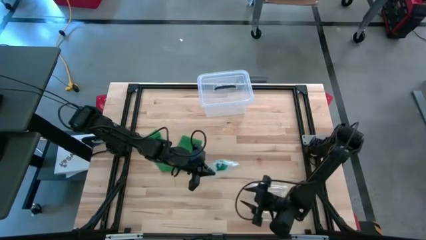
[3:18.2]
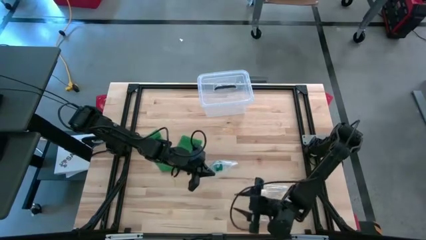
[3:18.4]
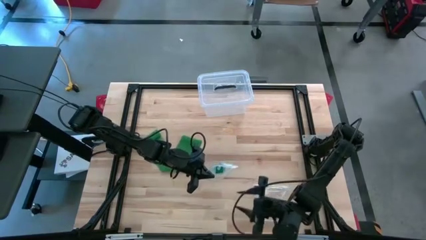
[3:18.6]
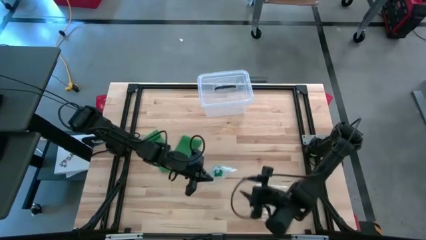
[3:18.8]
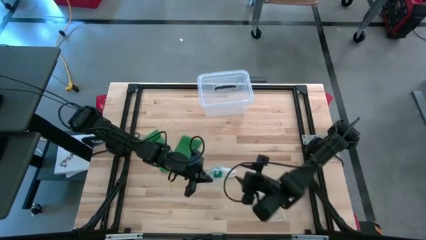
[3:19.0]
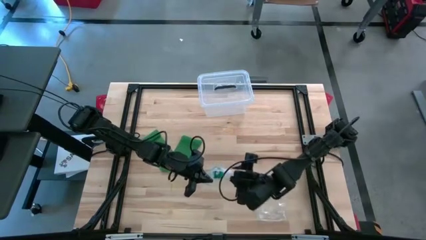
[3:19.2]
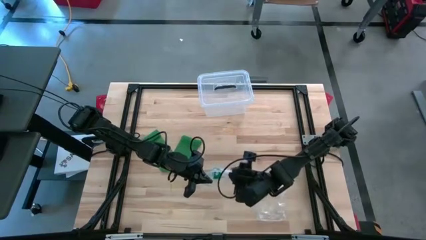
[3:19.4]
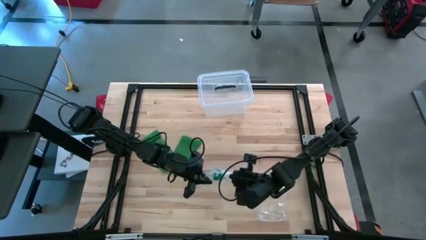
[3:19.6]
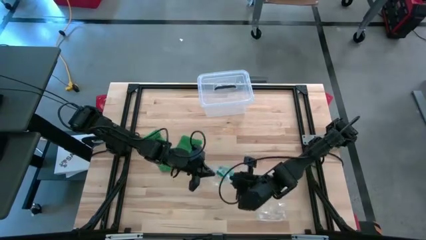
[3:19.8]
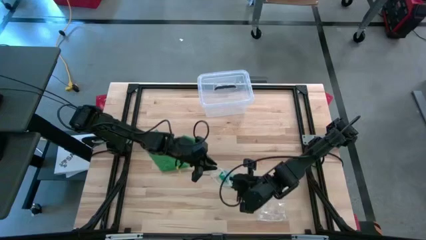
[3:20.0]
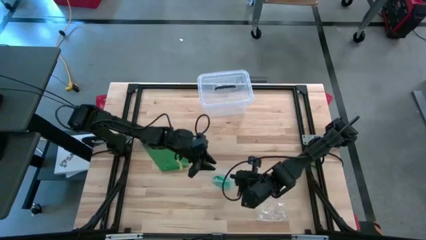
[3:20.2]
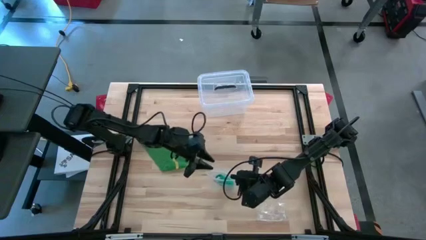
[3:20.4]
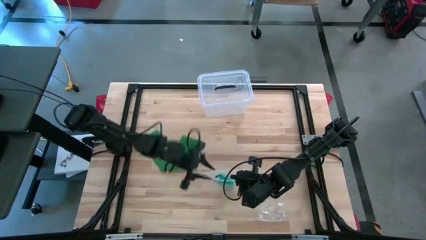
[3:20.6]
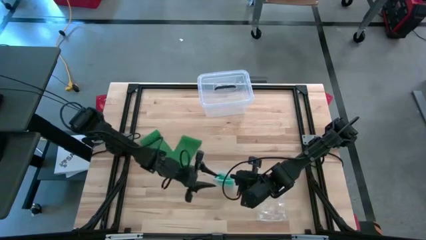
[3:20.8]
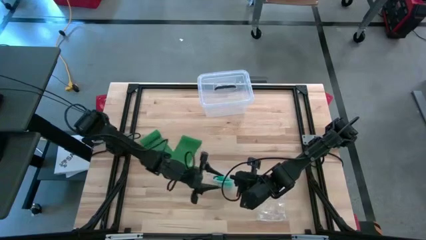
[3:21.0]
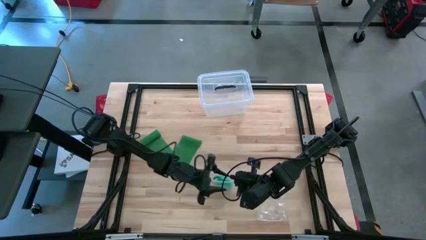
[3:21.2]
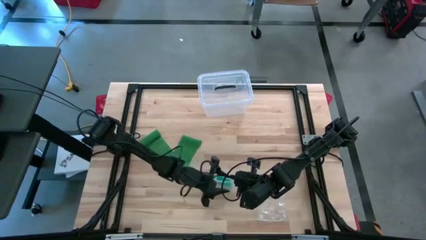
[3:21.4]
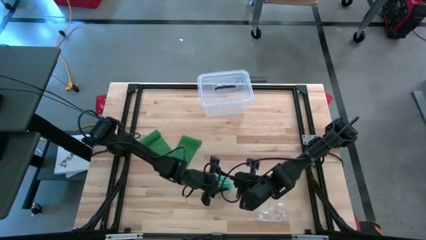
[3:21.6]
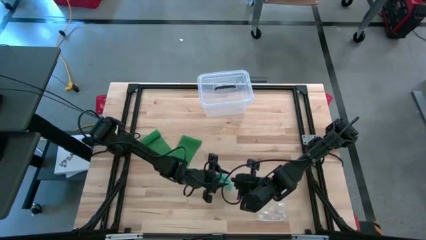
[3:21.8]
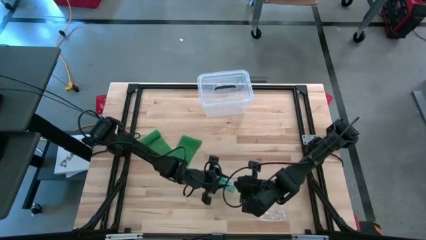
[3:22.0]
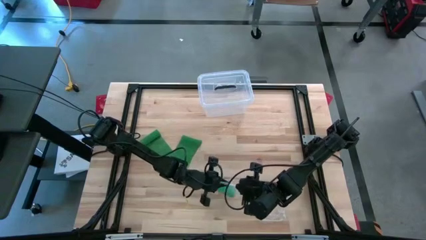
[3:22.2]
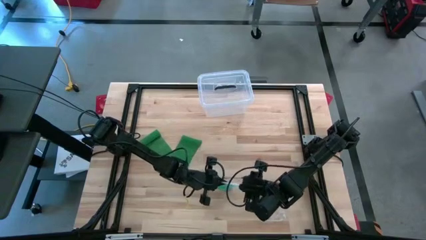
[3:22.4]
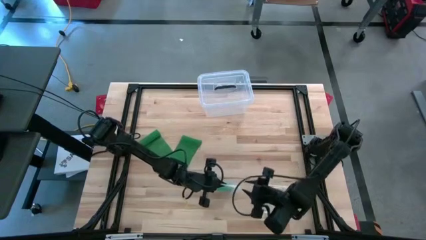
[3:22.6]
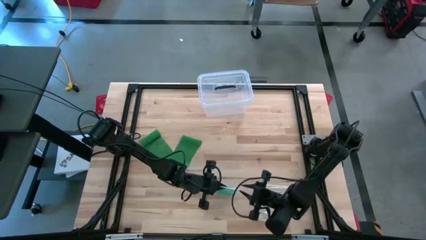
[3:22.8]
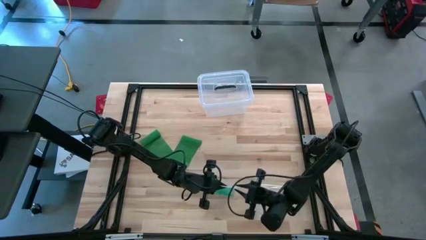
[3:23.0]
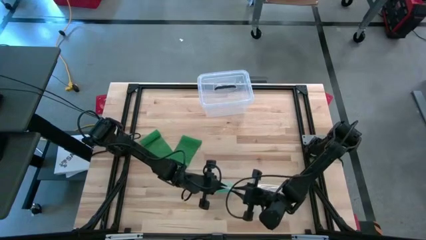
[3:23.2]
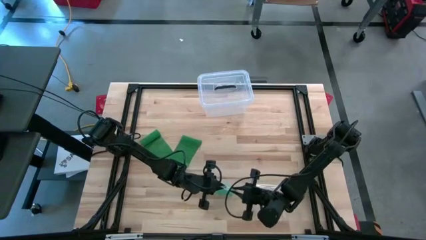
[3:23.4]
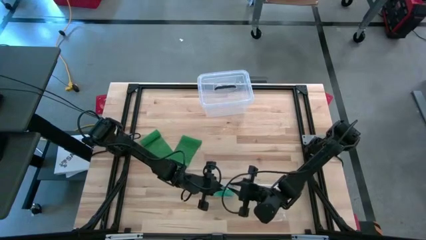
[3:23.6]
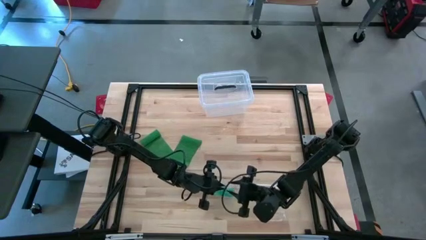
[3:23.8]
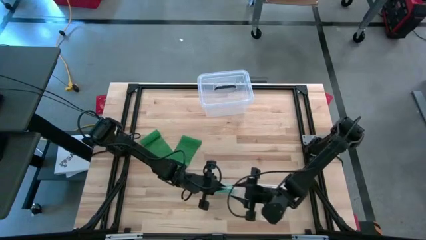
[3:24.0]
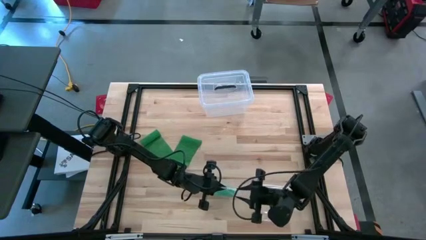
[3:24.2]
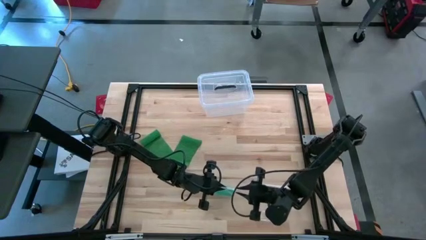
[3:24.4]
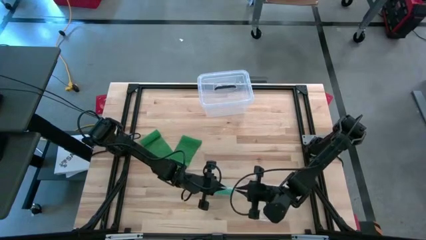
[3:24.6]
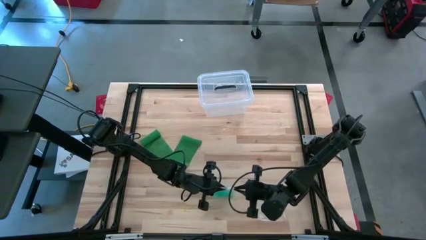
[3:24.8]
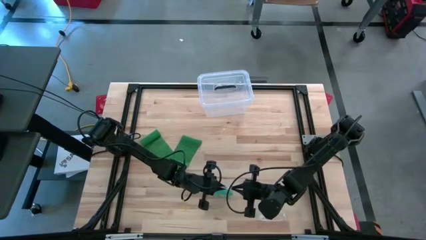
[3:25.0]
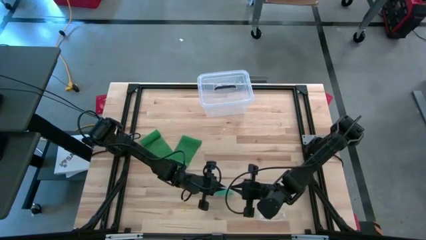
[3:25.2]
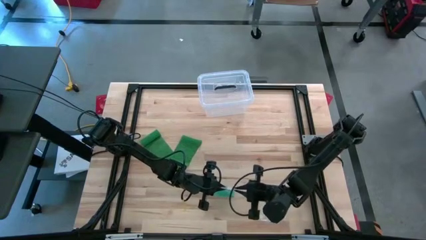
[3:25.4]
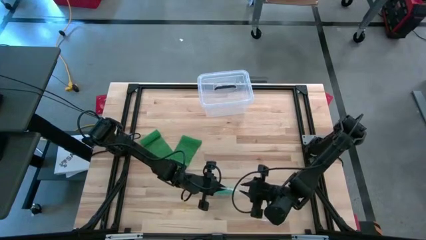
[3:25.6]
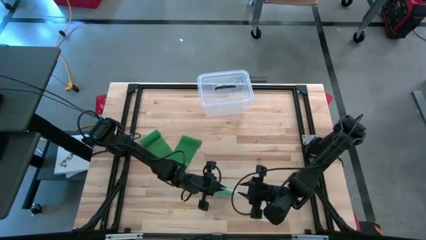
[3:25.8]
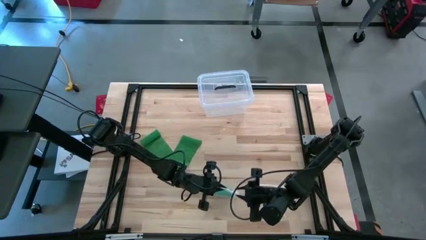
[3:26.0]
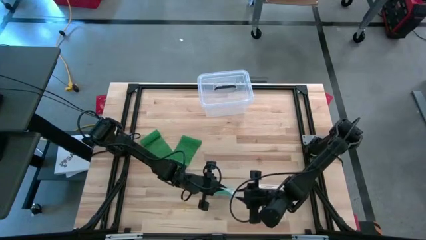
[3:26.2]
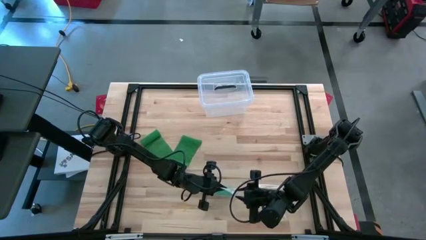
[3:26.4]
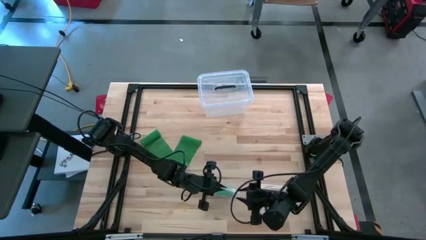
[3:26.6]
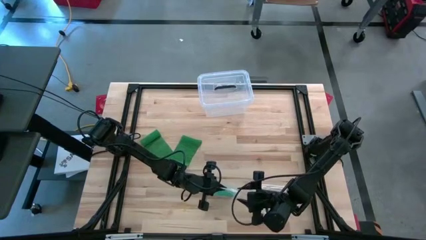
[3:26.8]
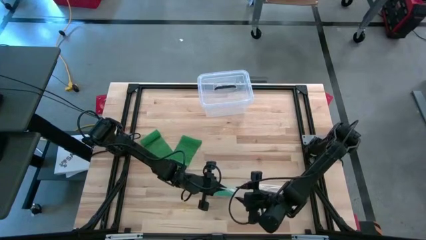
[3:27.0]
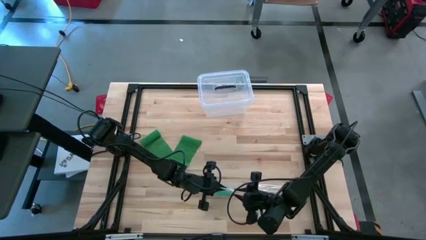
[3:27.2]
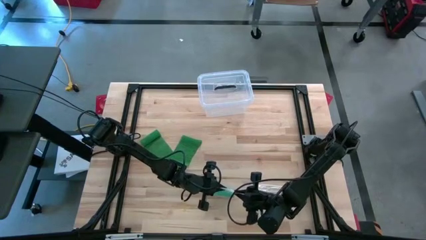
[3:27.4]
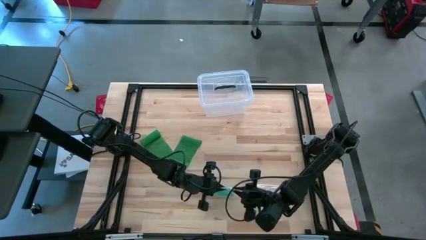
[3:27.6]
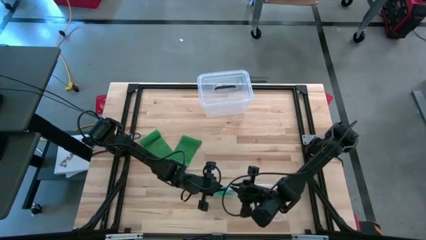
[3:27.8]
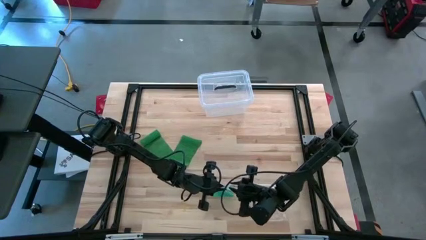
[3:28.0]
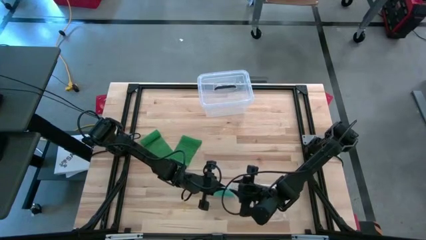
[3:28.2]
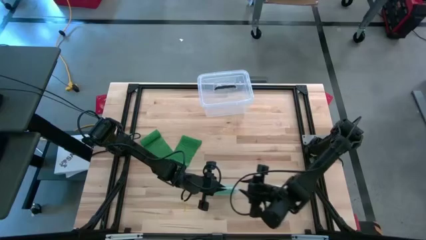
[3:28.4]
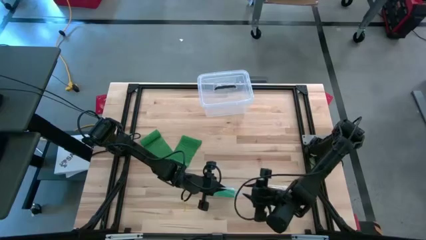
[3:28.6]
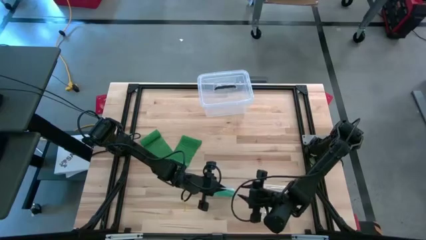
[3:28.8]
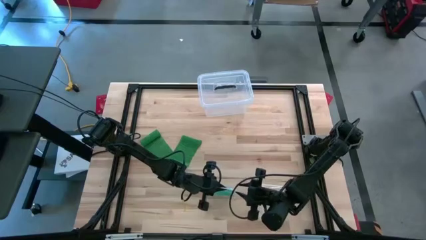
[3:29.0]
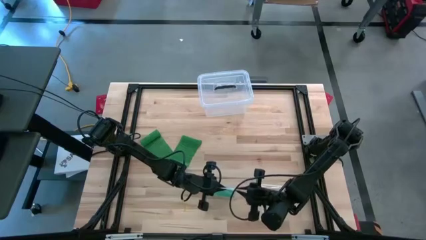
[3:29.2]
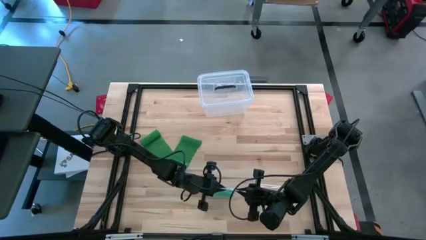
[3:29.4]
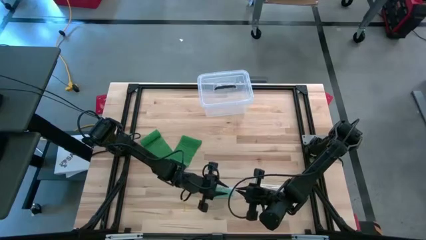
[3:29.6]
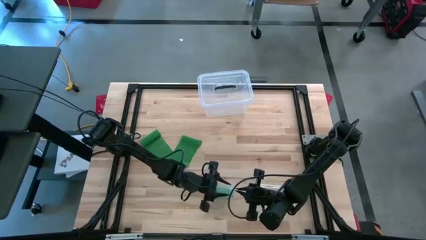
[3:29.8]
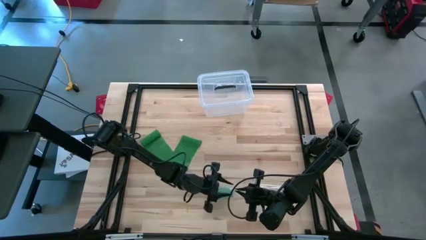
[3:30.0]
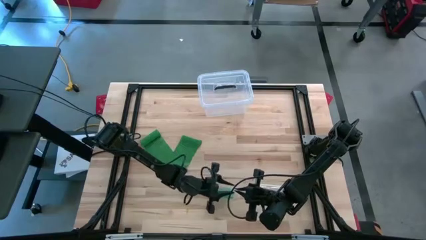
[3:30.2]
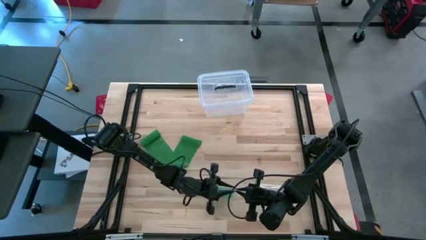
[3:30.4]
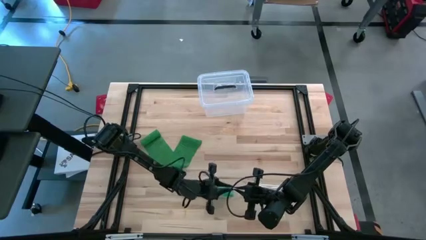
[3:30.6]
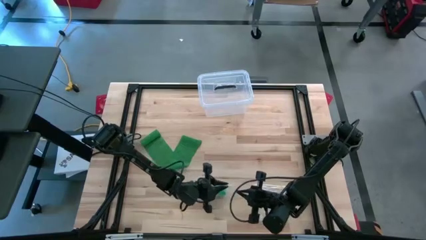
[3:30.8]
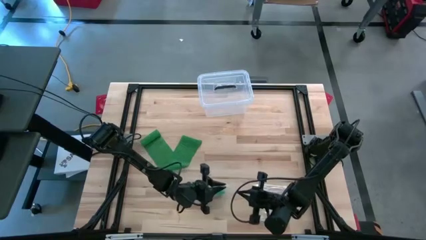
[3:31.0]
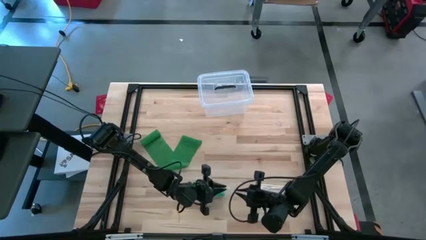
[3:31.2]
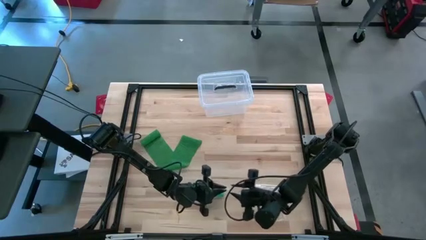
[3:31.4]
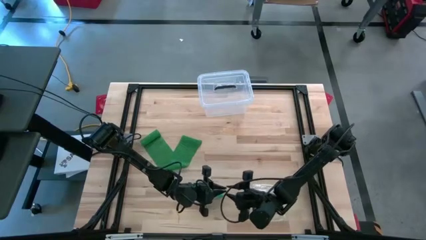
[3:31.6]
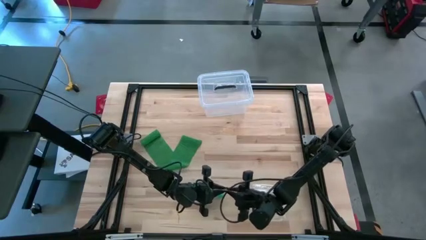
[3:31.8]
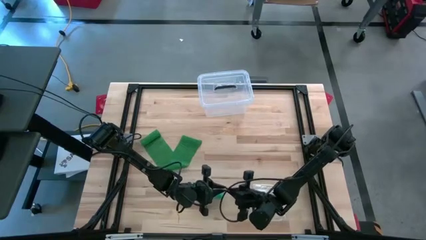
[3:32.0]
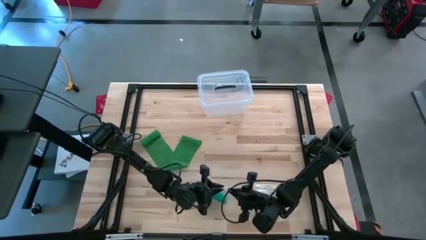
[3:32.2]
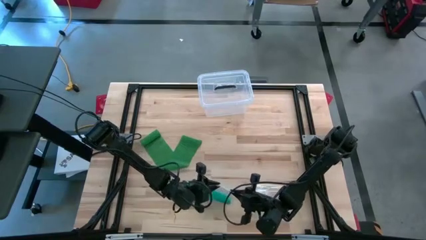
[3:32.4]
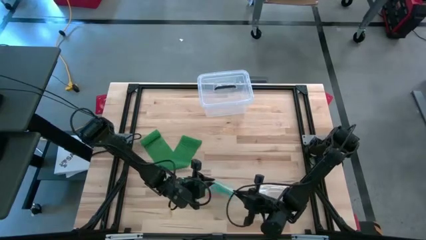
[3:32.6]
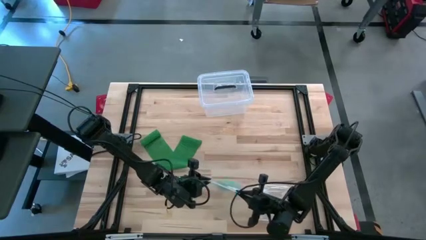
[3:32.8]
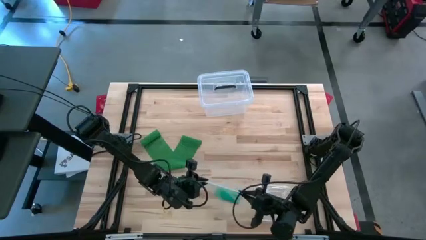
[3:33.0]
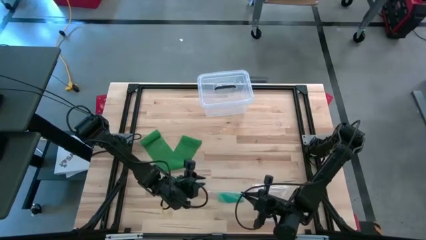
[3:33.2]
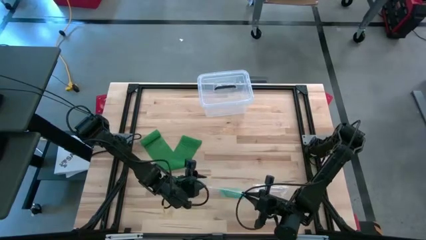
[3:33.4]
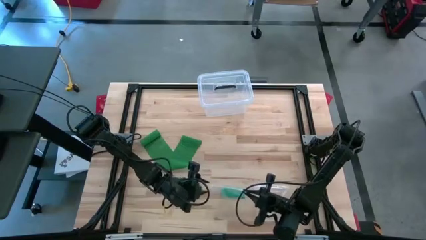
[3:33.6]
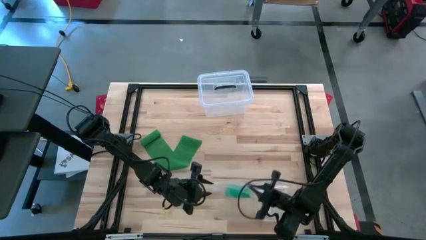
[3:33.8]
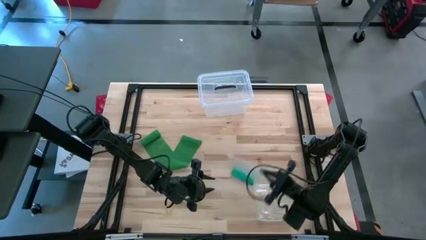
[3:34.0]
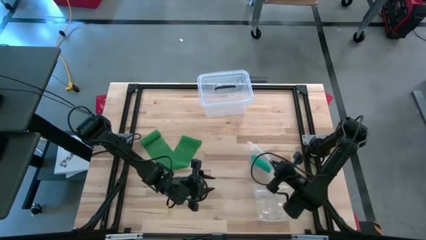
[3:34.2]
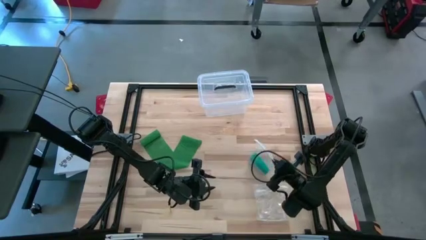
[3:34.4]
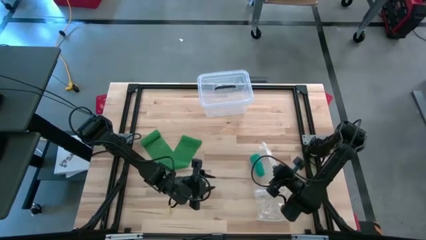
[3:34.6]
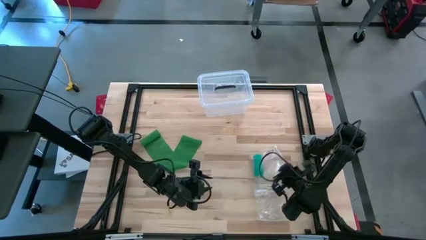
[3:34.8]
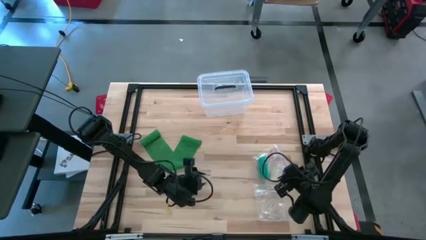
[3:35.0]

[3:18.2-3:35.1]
Task: Roll bandage
Close the transparent zip bag
